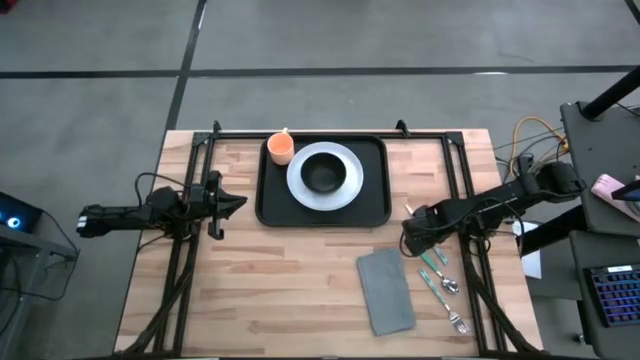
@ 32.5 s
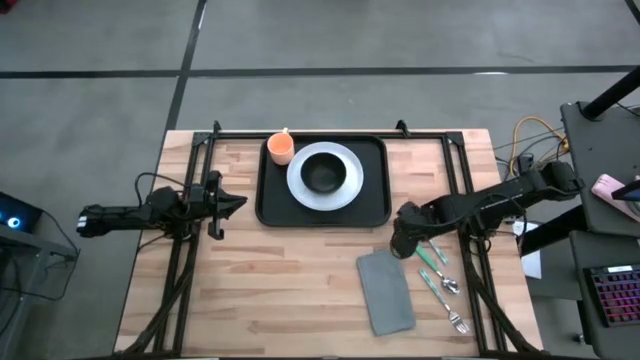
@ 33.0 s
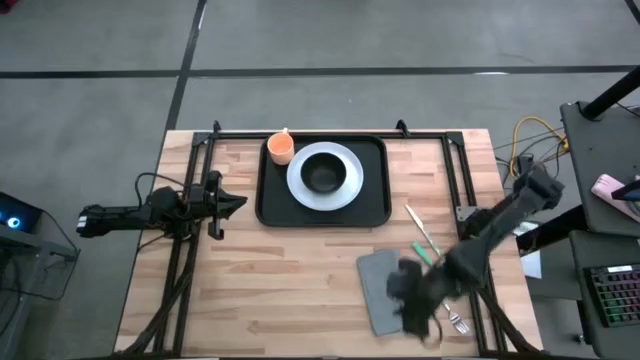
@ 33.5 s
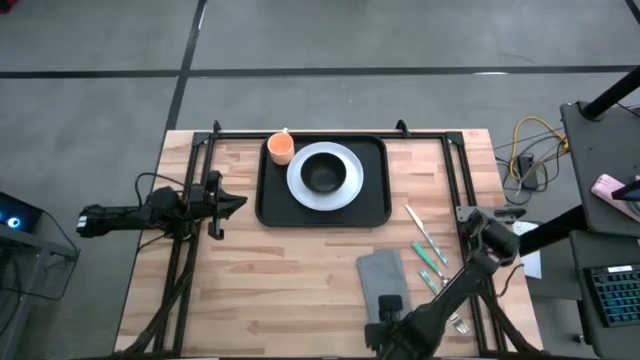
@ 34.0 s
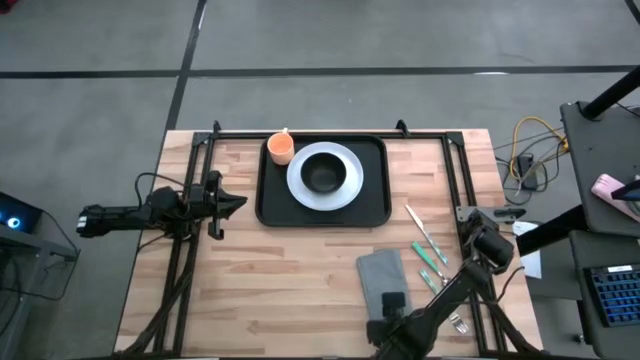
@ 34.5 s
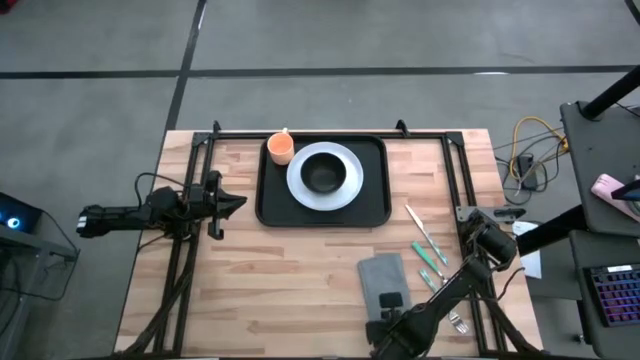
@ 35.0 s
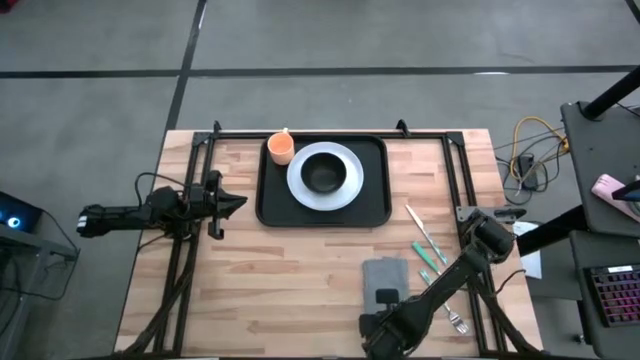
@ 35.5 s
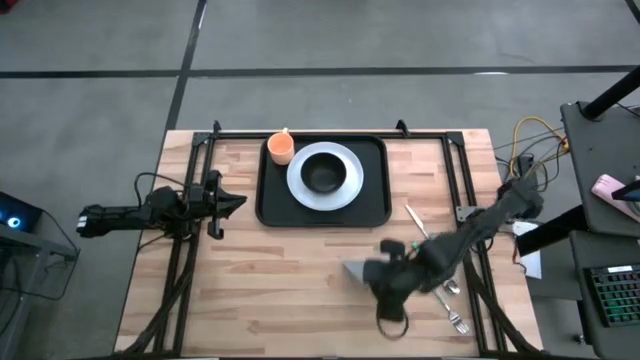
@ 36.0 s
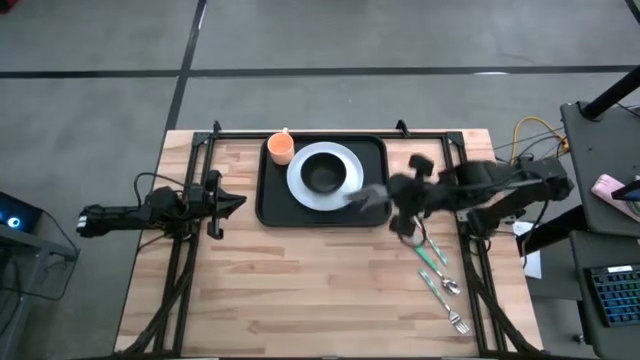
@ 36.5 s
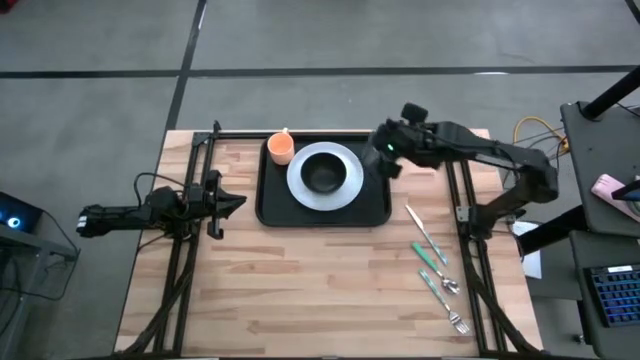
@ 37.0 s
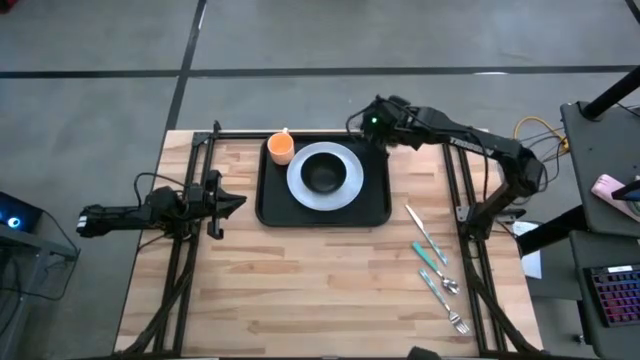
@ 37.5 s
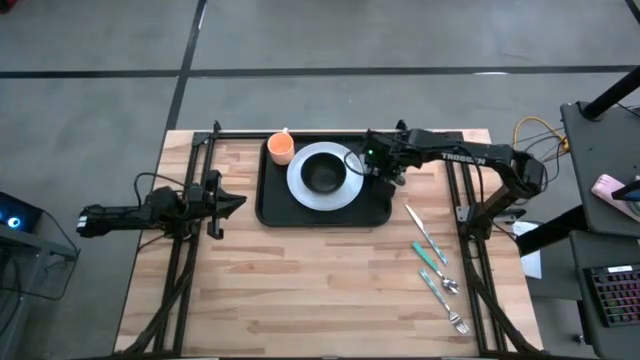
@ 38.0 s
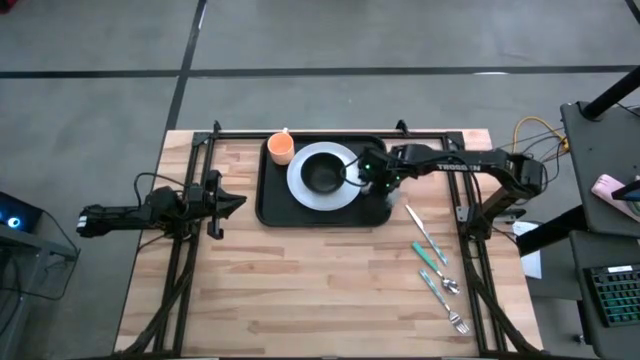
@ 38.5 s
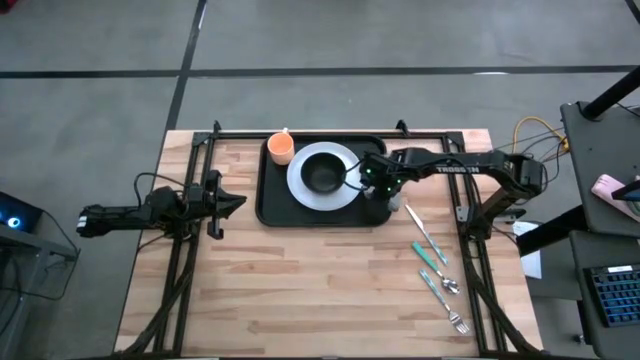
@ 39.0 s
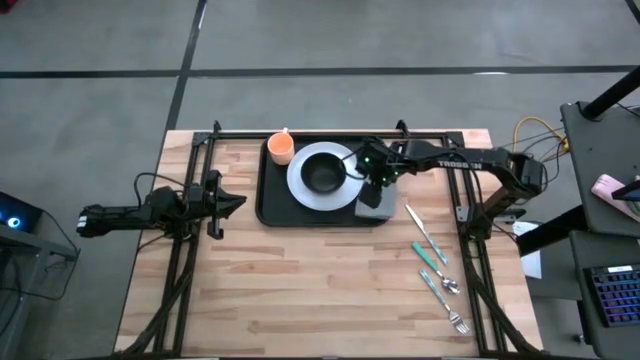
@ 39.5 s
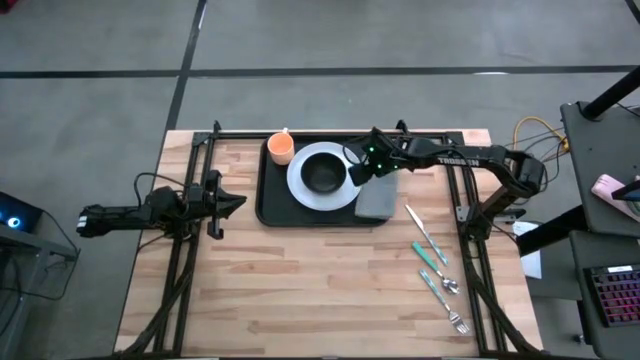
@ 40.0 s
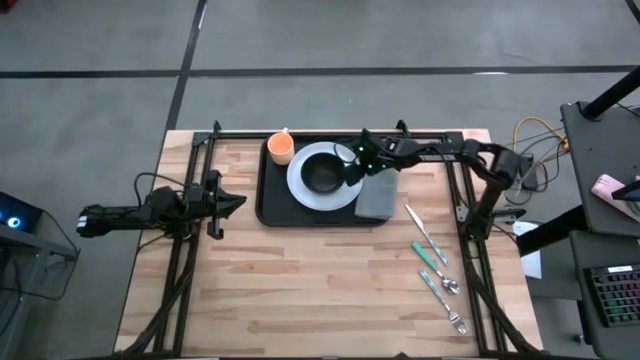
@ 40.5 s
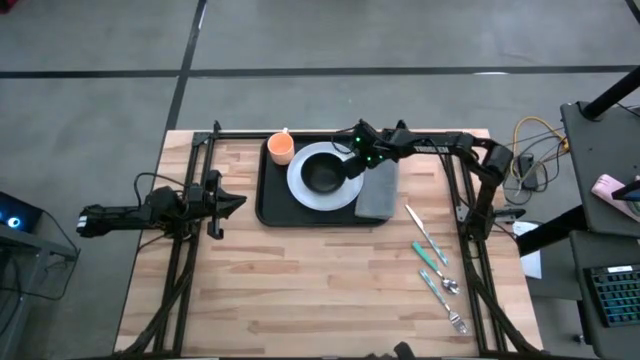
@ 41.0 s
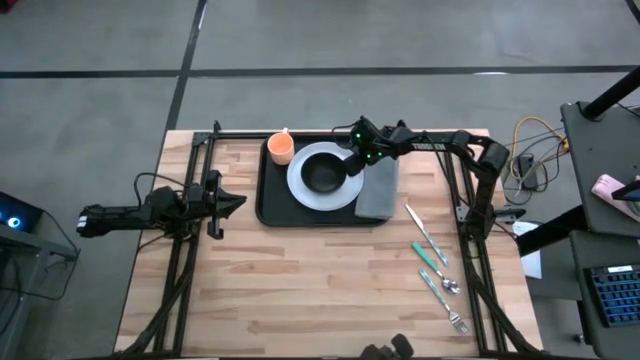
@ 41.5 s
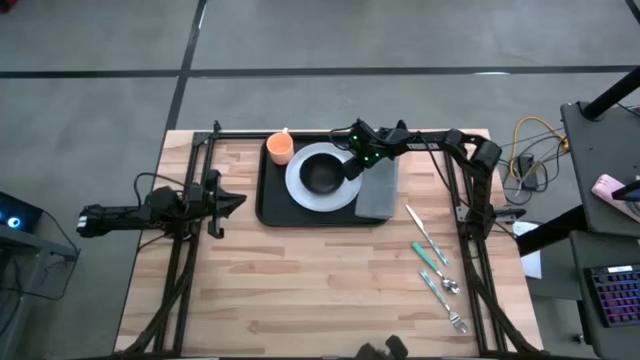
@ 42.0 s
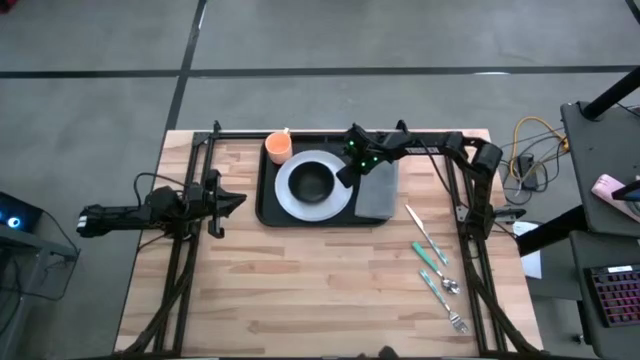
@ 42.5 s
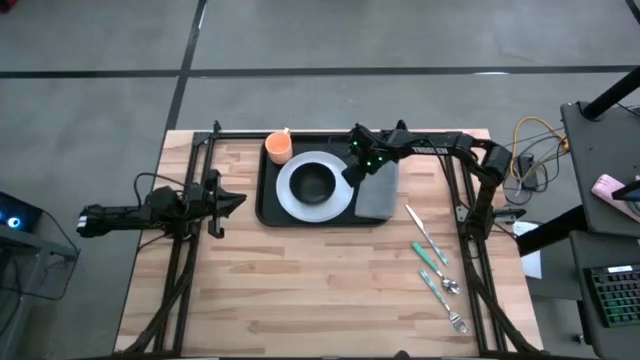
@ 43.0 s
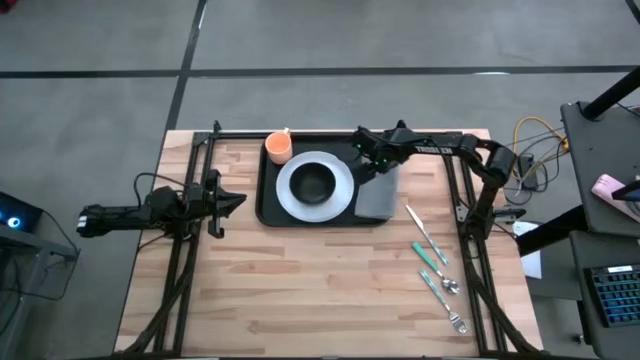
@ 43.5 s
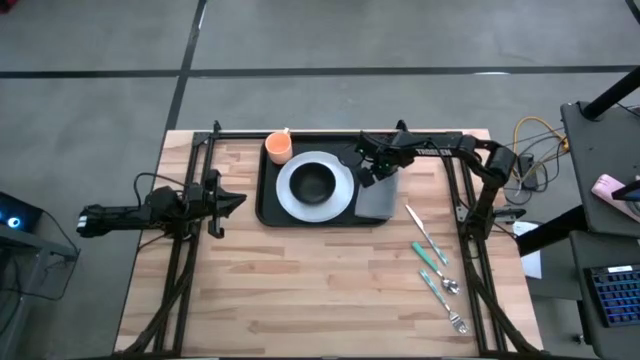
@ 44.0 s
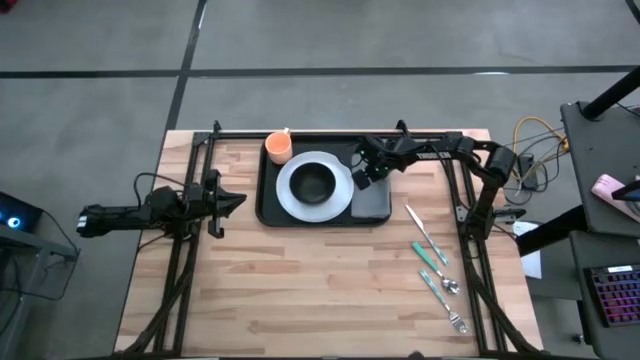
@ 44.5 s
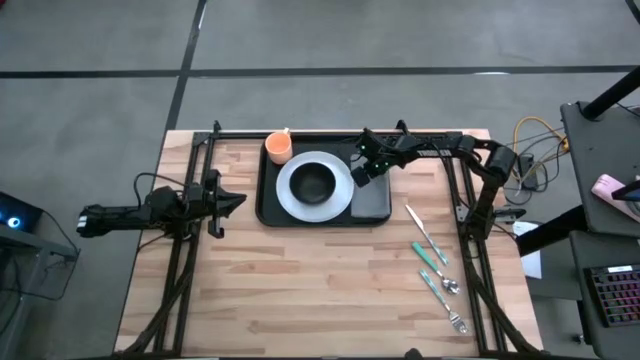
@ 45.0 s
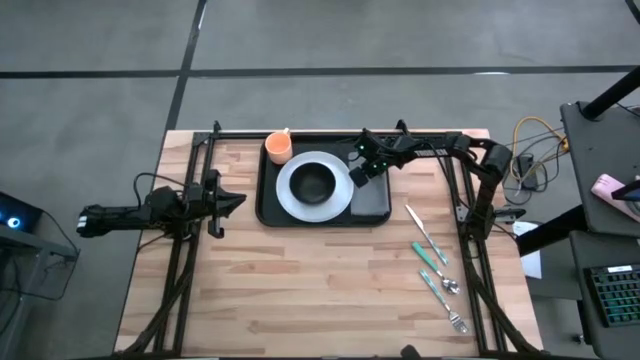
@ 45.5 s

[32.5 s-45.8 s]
Task: Set up tray
Put the gray napkin on the black serving tray to the right of the white plate

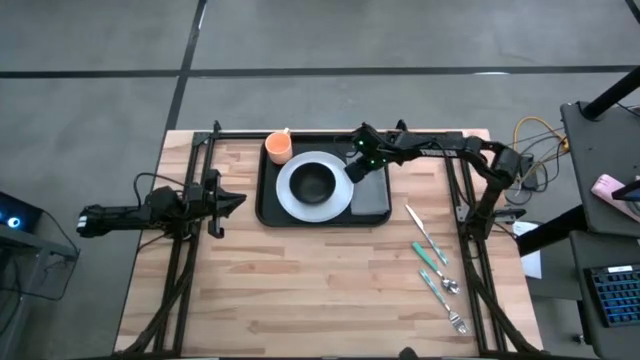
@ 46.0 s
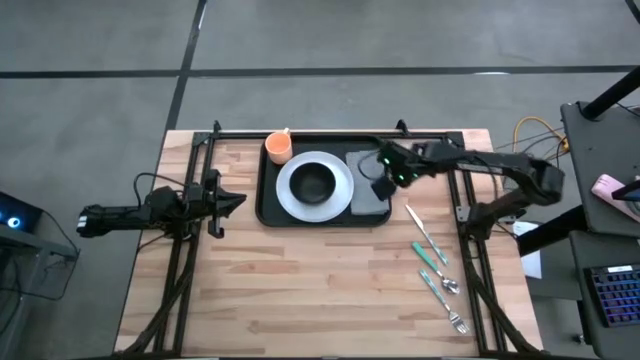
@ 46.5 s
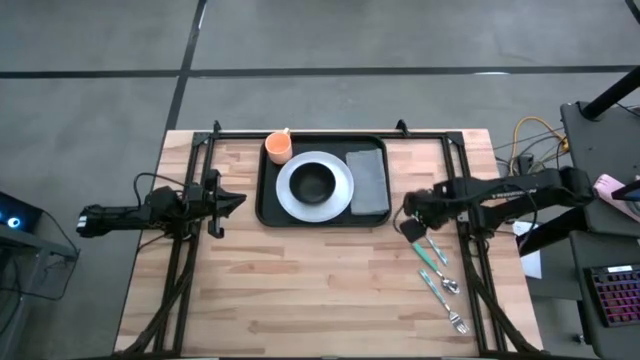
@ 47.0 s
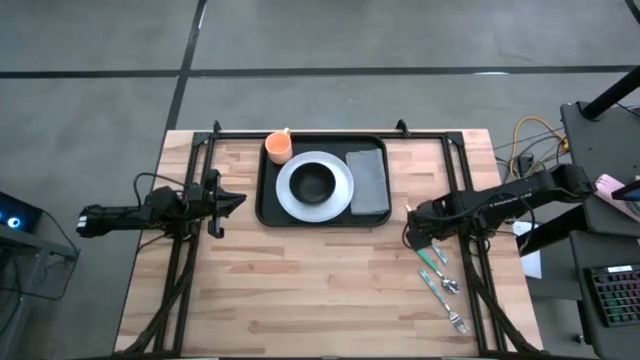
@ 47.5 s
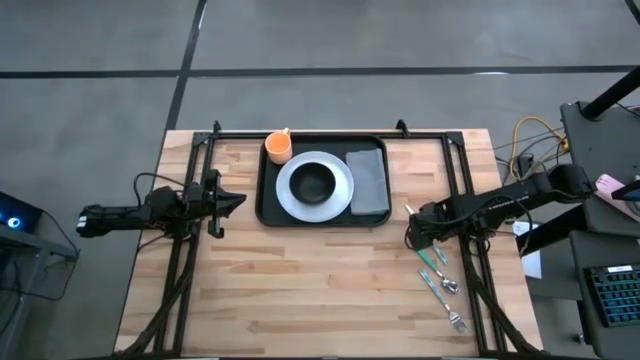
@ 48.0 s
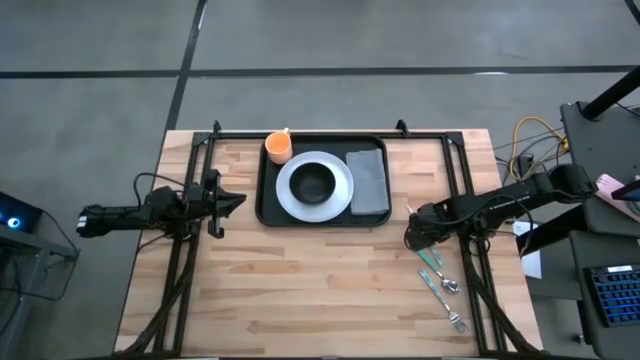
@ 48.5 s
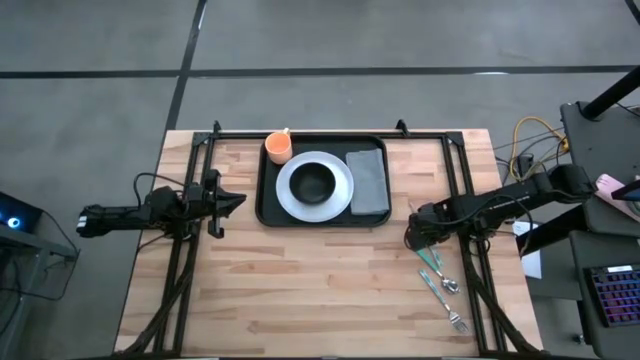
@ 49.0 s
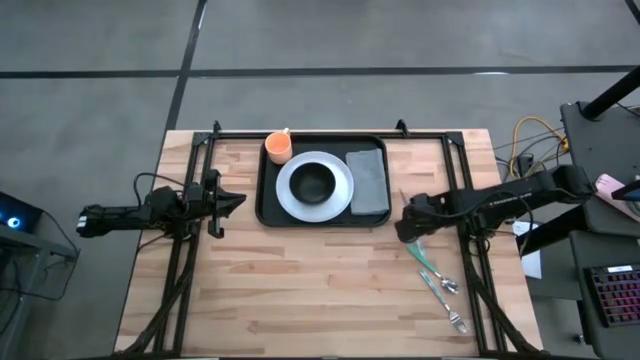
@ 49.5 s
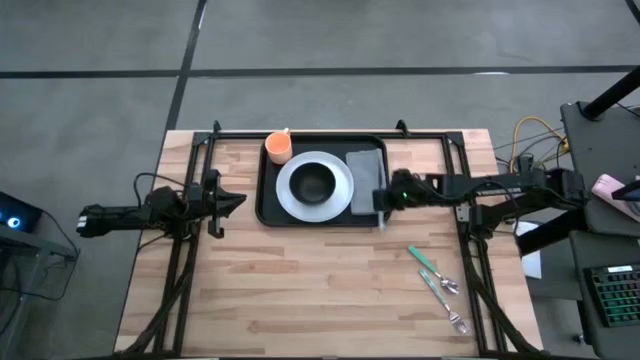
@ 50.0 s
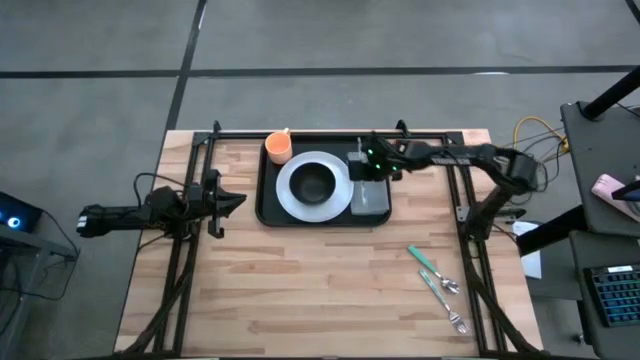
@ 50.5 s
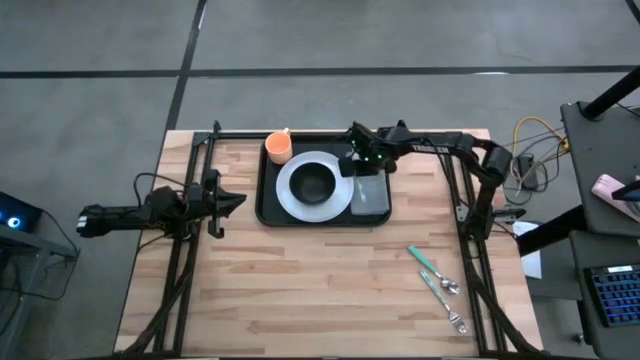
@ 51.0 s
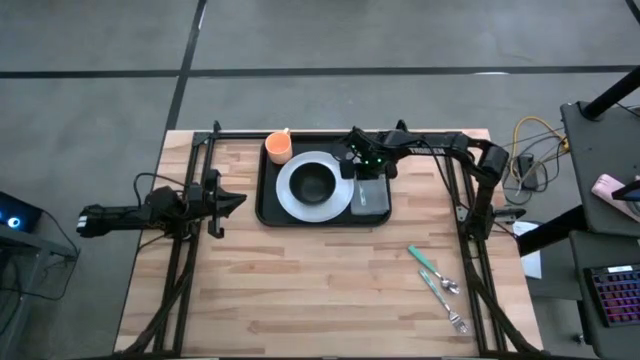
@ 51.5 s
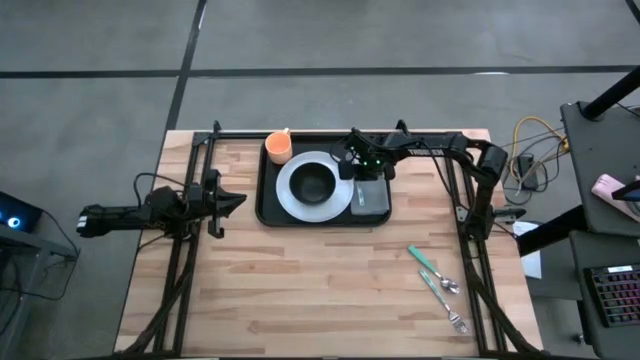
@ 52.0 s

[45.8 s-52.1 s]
Put the green patterned knife on the gray napkin
